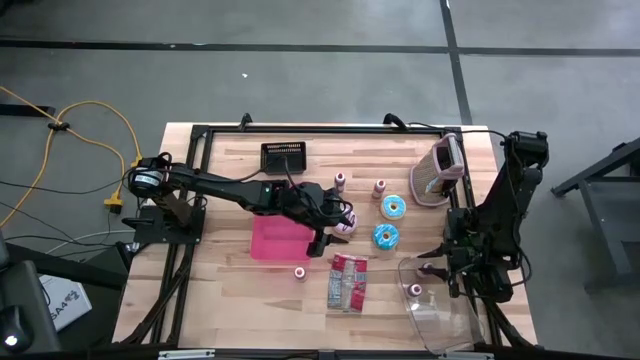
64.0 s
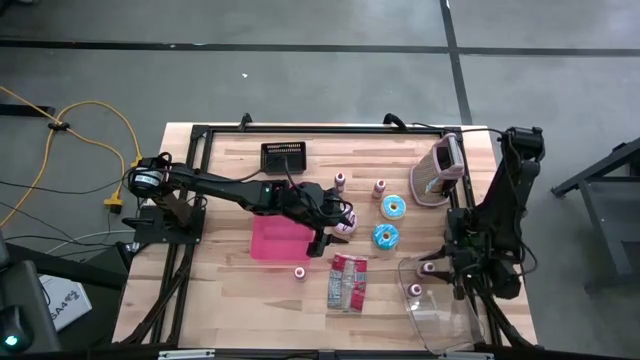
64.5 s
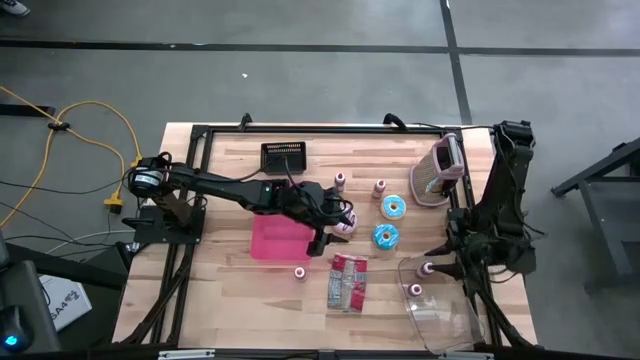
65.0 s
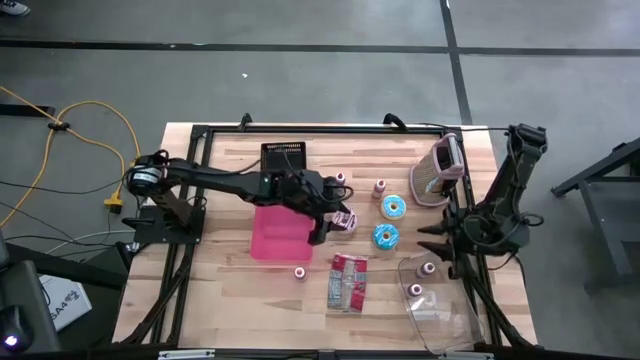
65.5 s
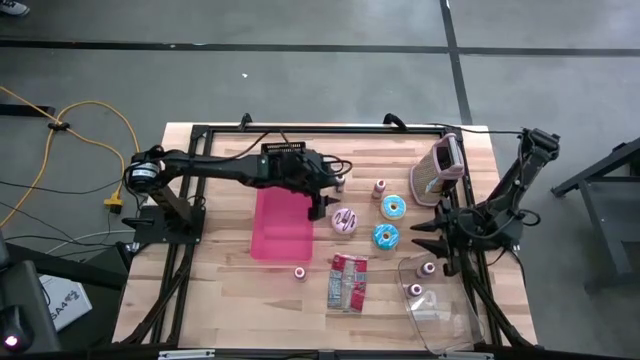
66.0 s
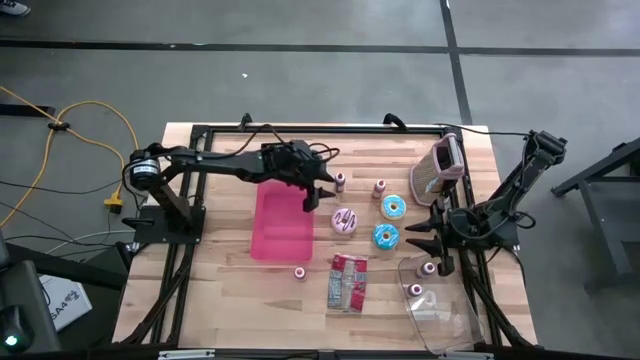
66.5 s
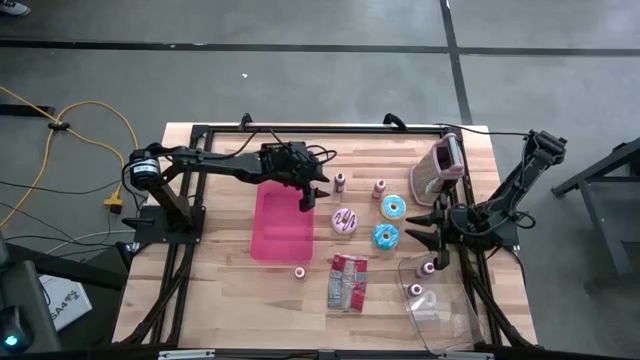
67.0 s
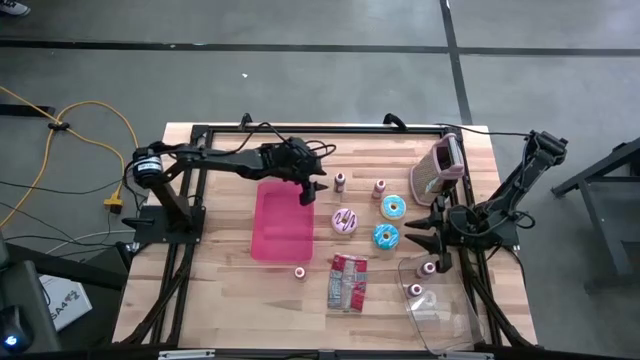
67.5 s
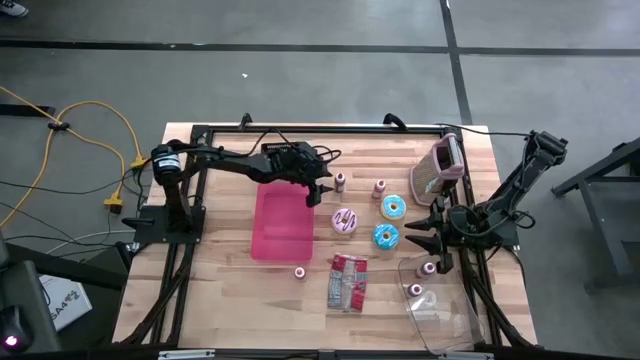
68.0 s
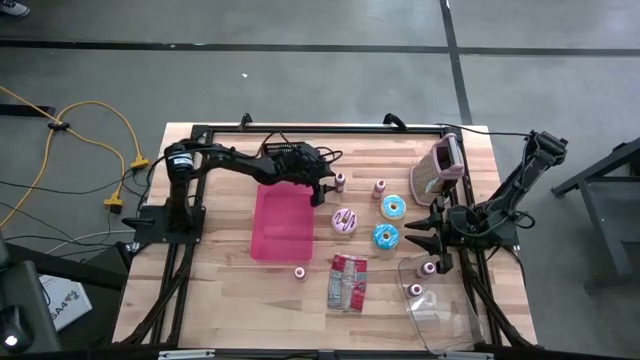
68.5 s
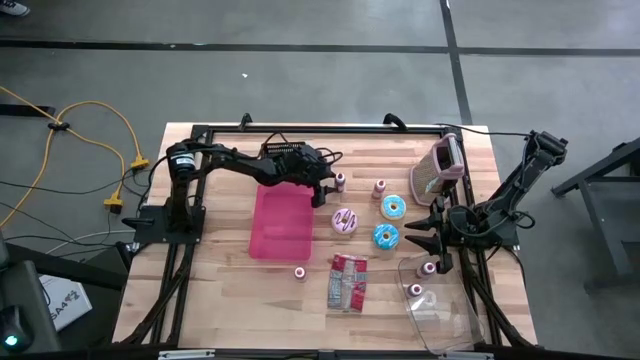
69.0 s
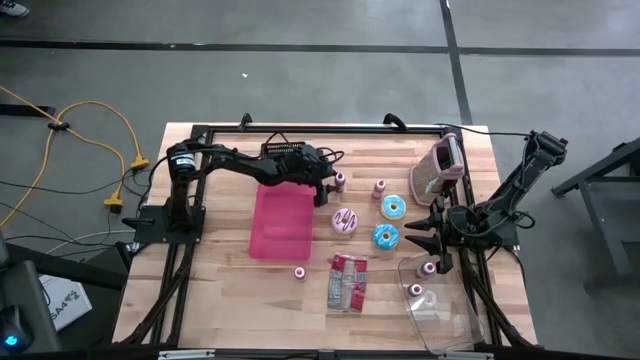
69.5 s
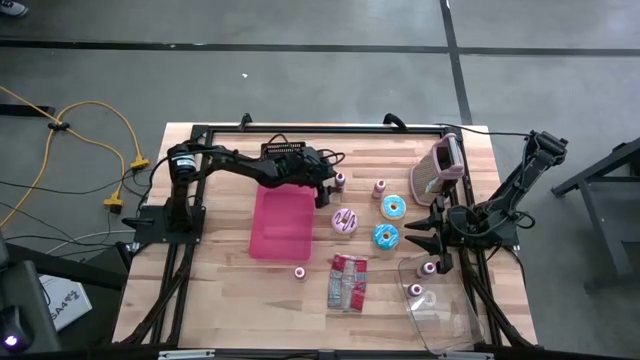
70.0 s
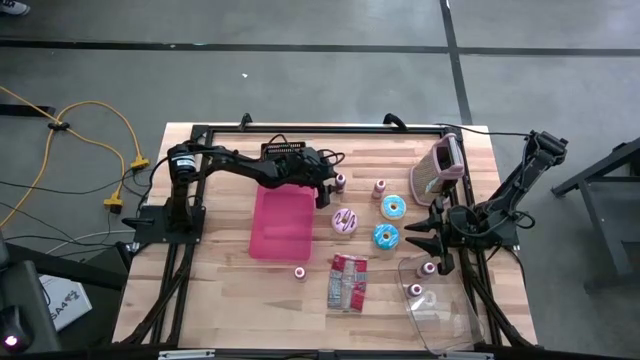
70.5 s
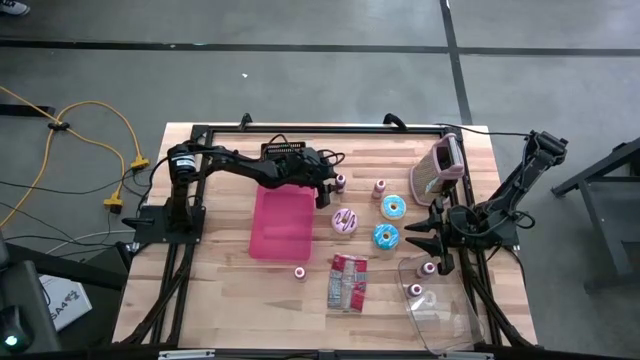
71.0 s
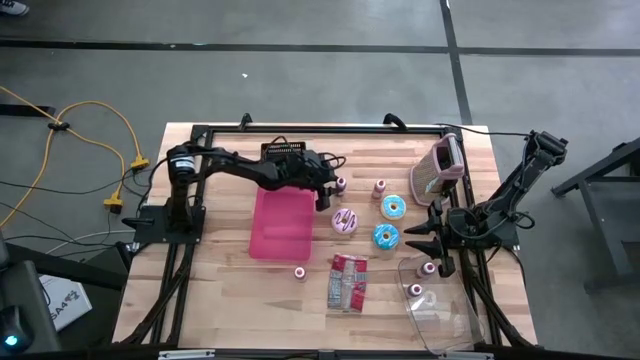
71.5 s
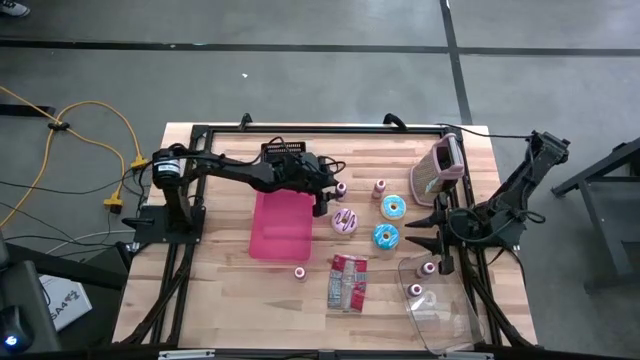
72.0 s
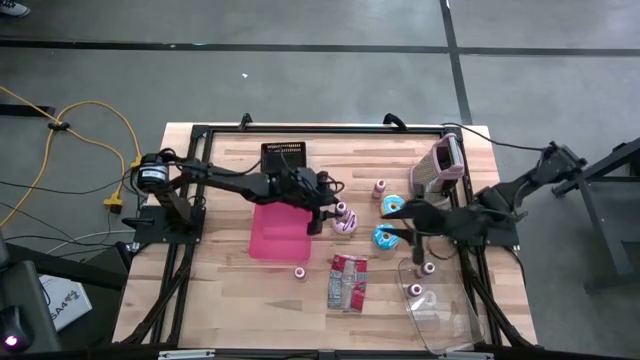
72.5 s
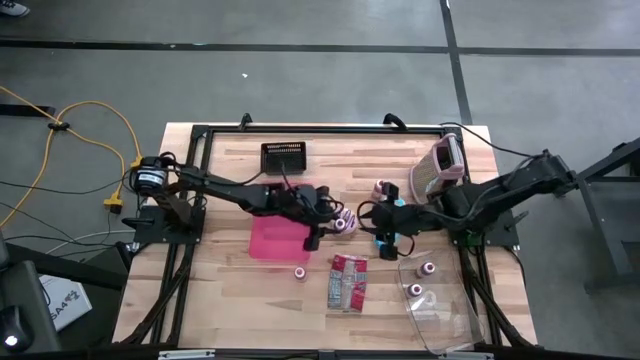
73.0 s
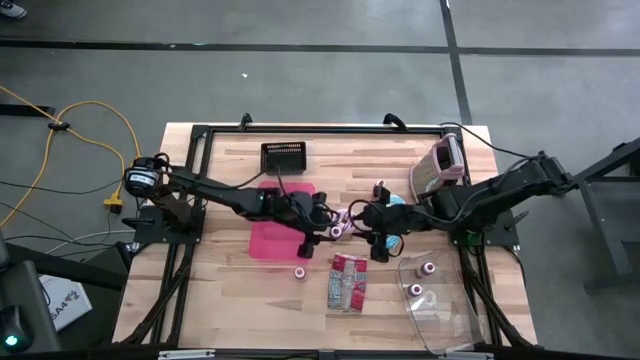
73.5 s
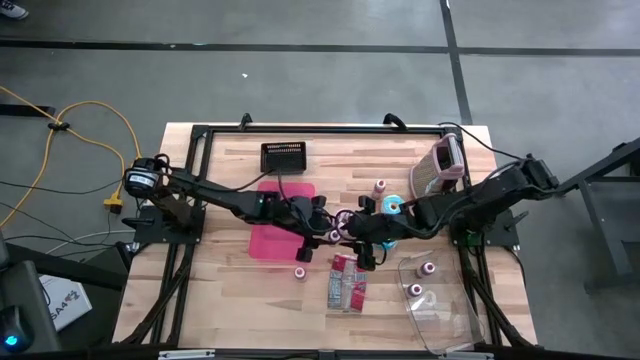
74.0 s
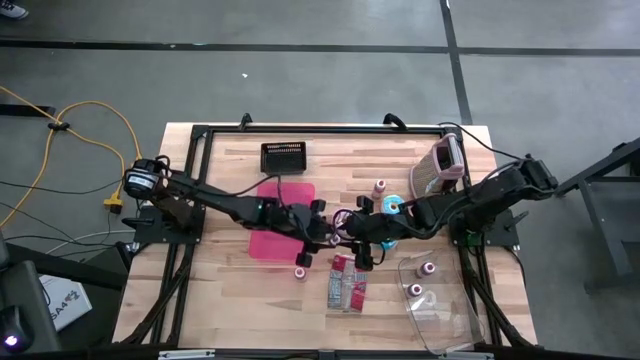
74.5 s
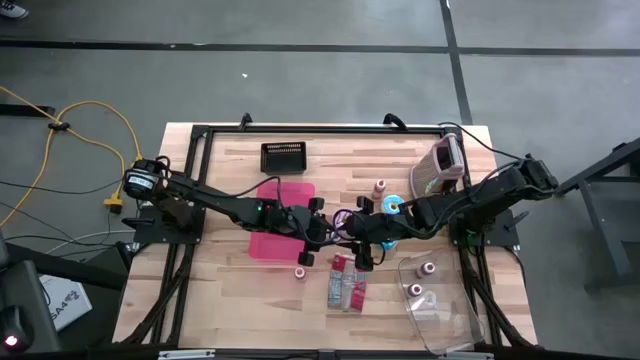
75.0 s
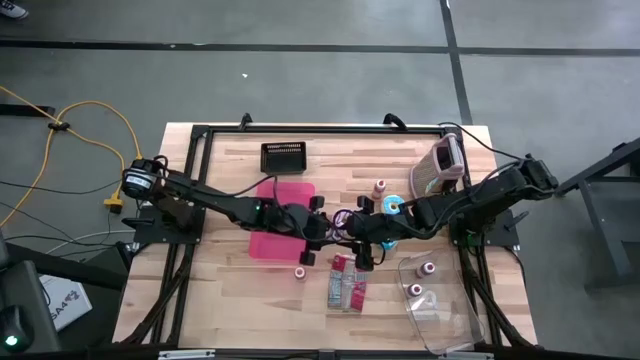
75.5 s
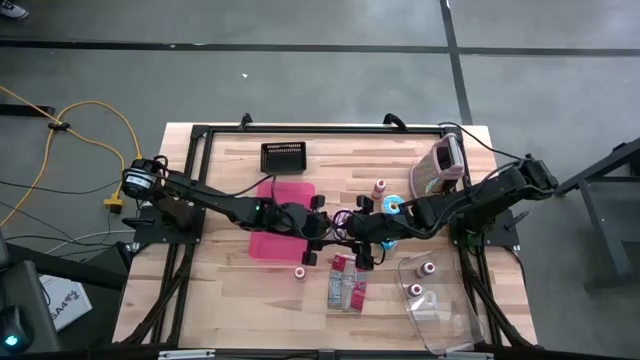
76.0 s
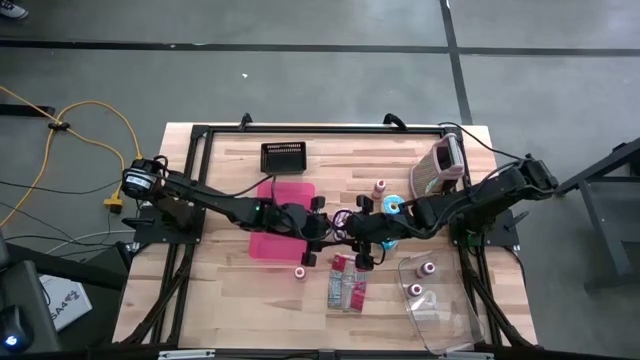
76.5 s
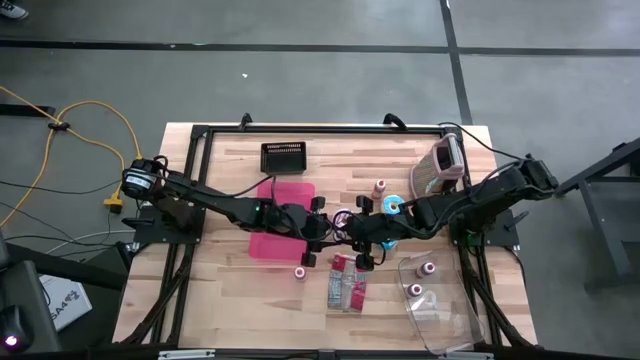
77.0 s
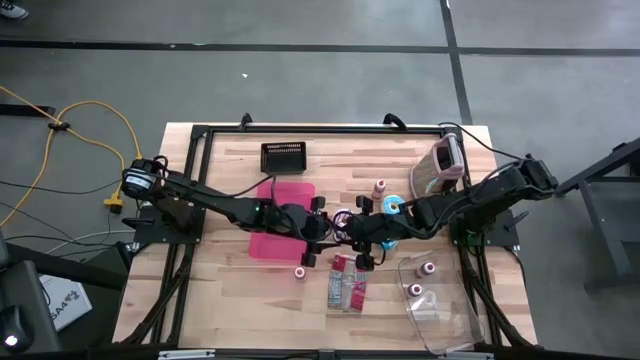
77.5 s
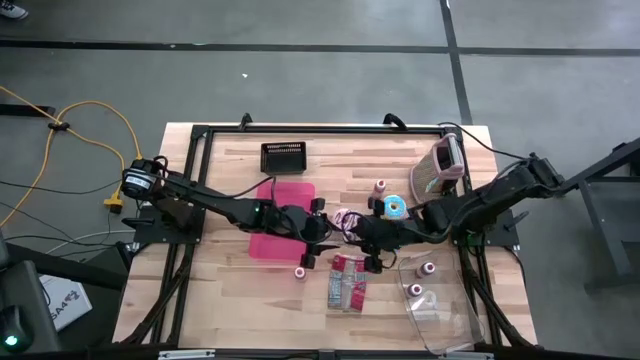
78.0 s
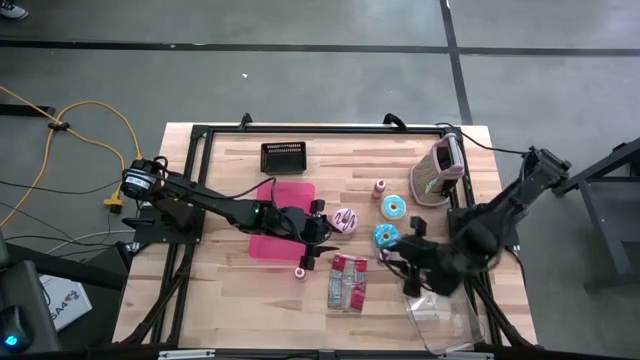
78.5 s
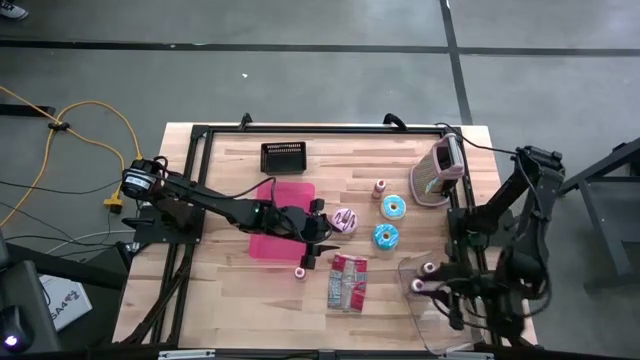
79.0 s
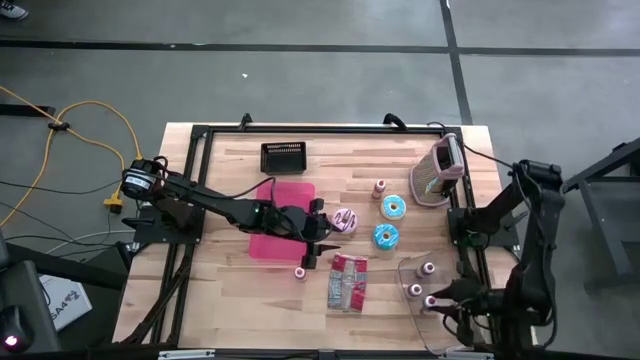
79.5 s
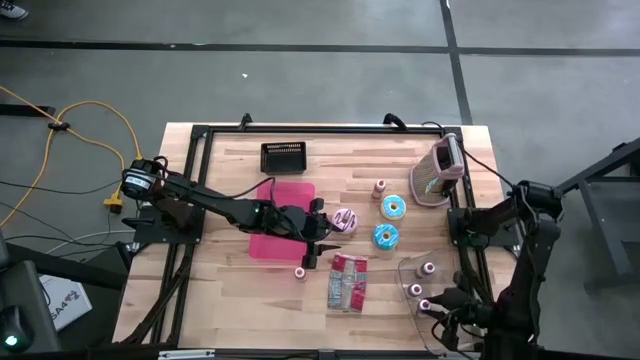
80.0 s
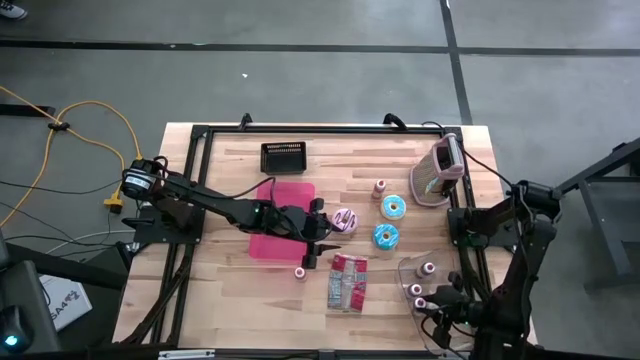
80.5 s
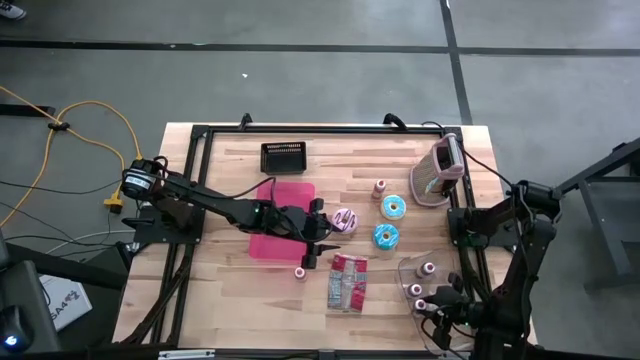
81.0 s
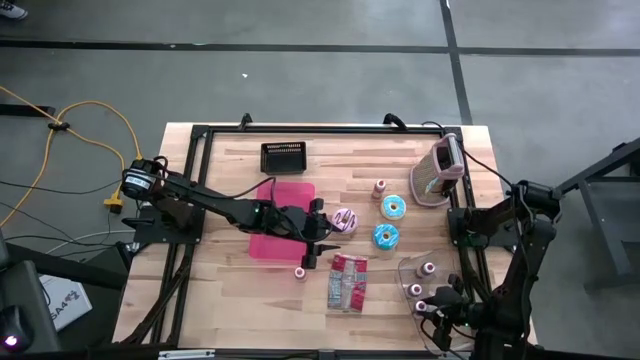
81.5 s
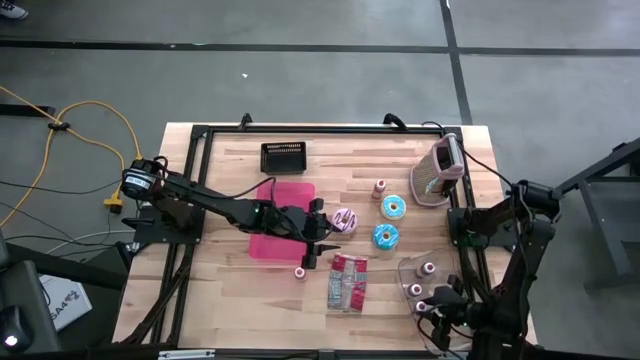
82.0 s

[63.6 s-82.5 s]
Put the red food coloring bottle into the transparent bin

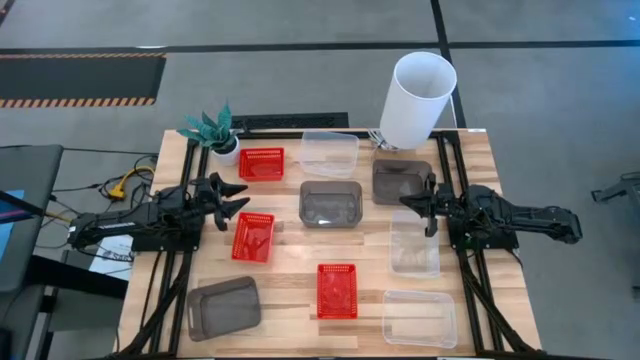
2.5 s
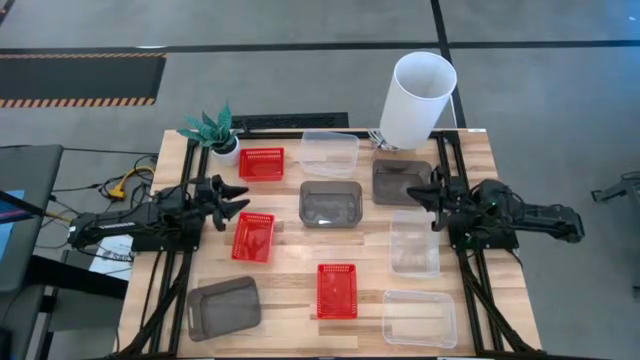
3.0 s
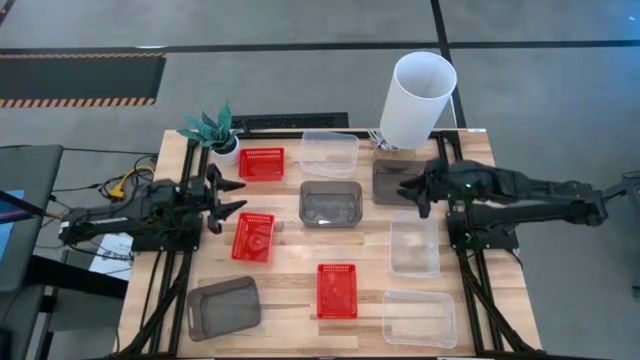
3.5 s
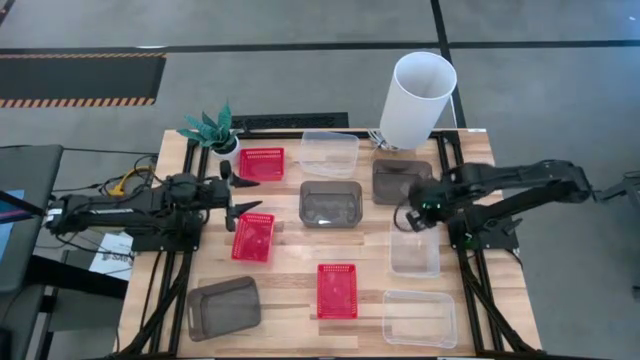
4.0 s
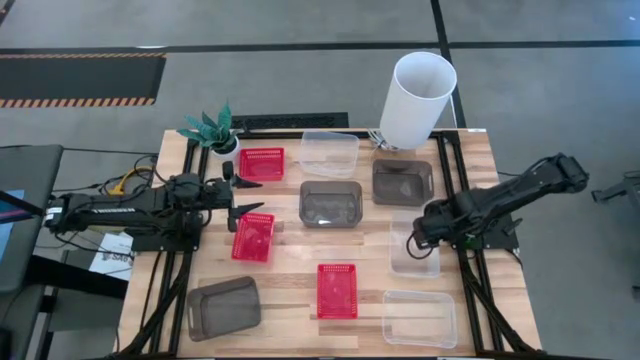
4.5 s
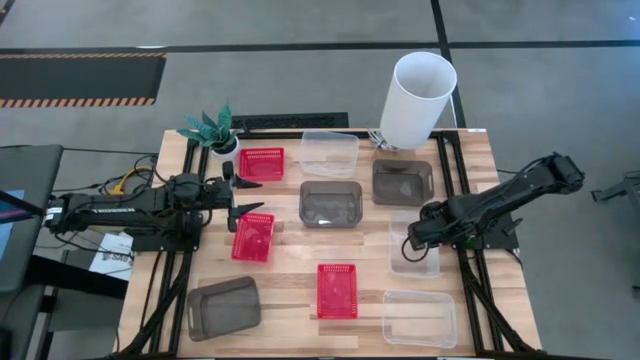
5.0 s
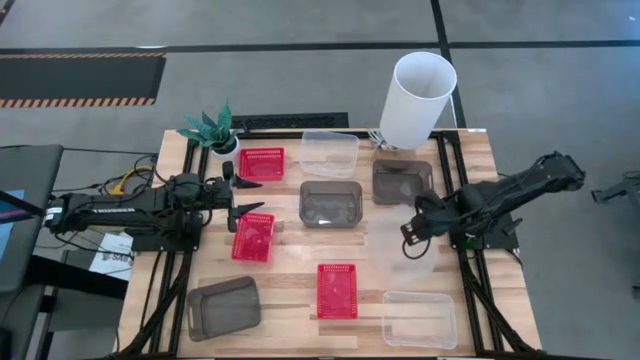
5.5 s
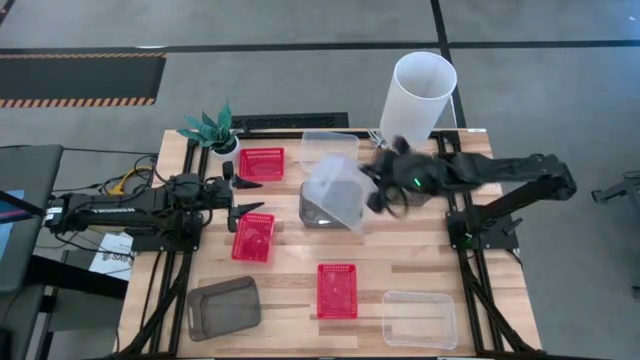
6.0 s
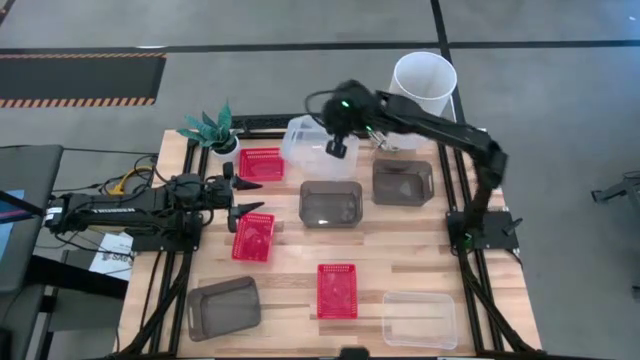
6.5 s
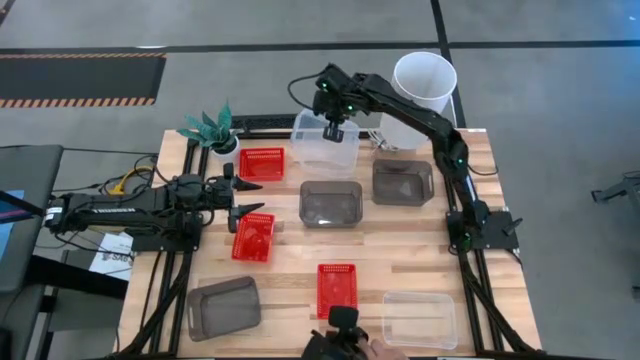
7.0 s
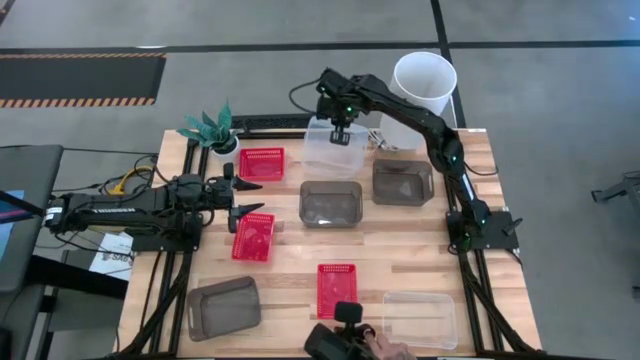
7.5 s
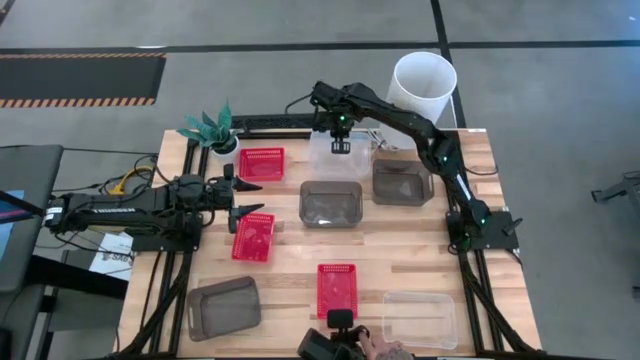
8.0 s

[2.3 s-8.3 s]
Stack the middle right transparent bin on top of the top transparent bin
